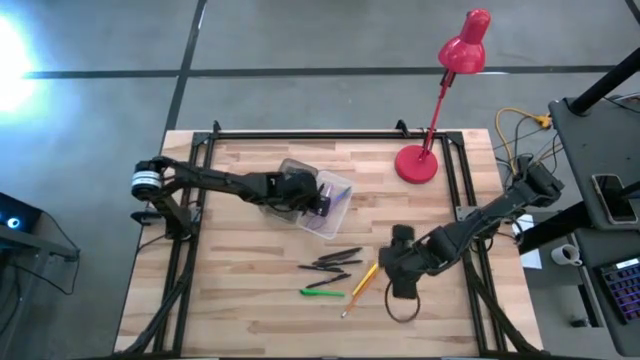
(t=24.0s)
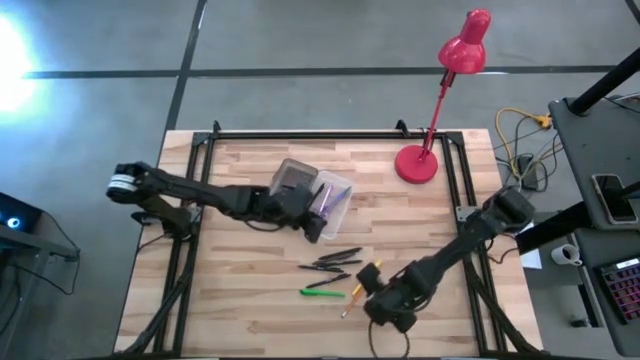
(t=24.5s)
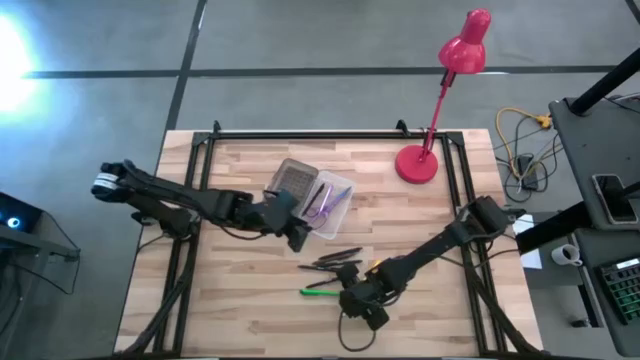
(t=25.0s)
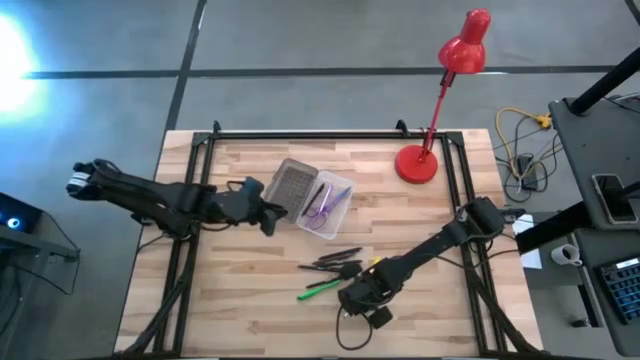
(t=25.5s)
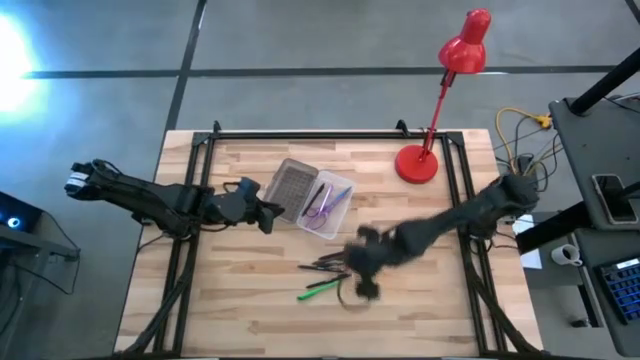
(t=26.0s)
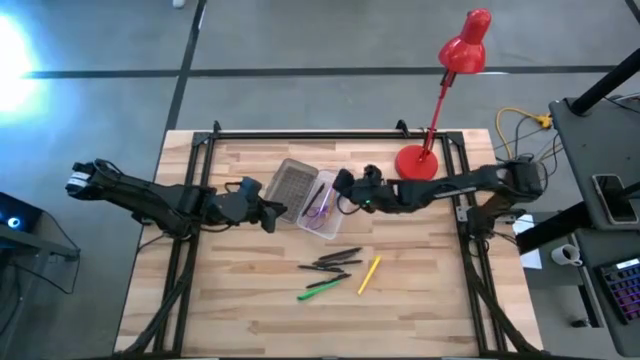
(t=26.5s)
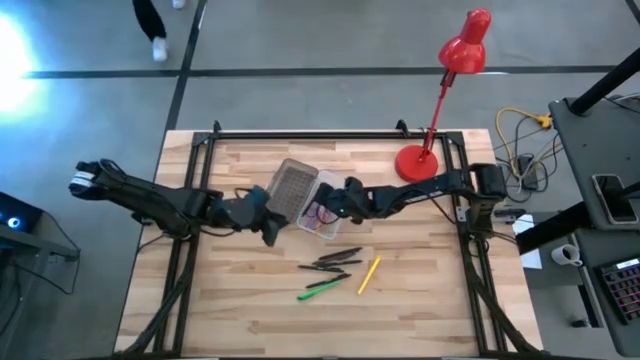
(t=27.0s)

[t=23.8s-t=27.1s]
Task: Pick & place school supplies into a supply box
Put the orange pencil into the supply box

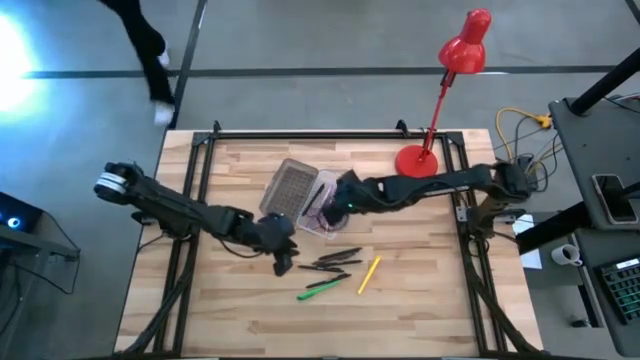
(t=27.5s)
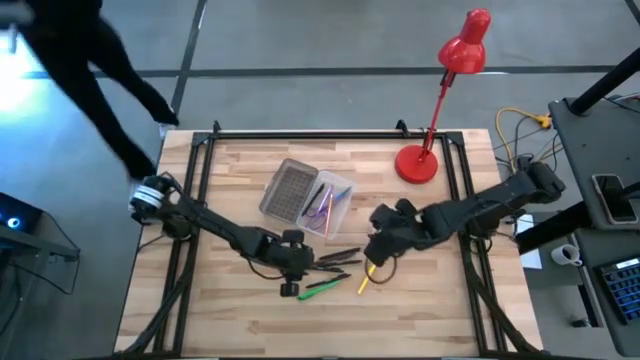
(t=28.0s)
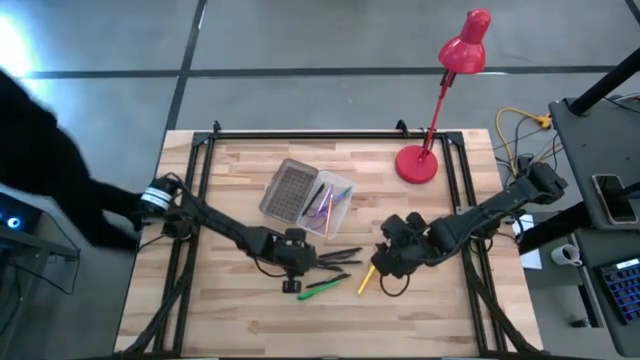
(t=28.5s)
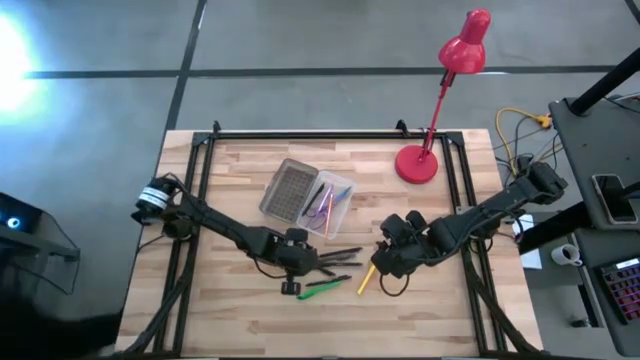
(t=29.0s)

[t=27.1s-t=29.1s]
Put the black pen into the supply box

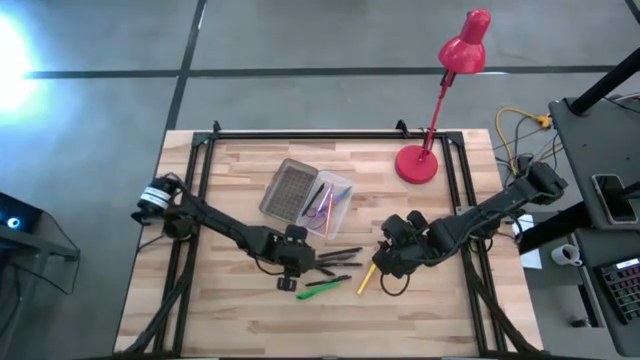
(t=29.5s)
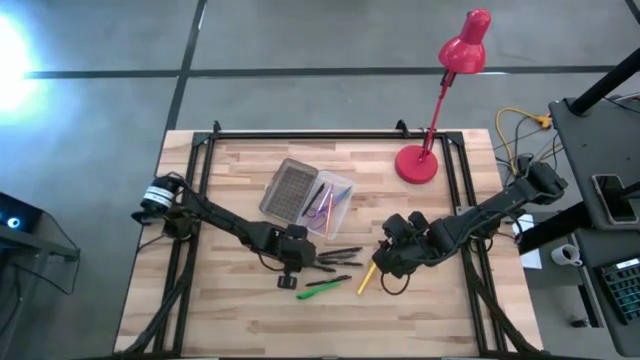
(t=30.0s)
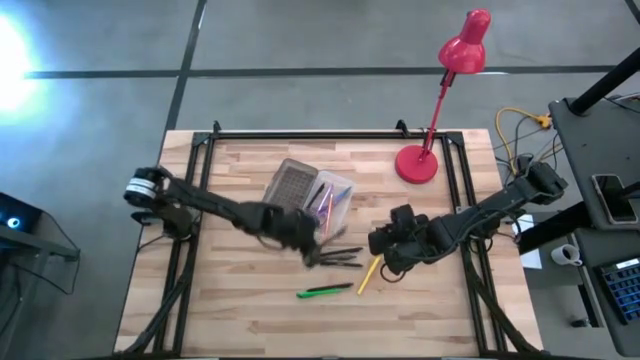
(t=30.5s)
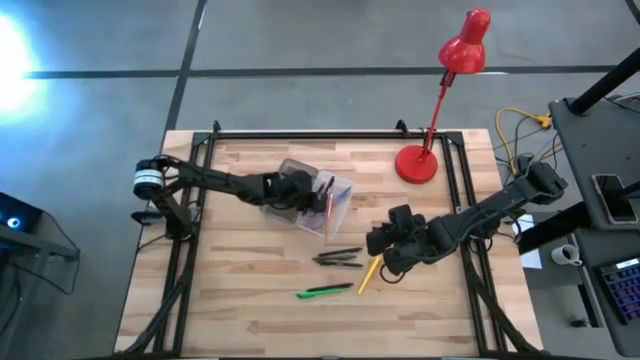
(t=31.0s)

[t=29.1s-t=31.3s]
Put the black pen into the supply box

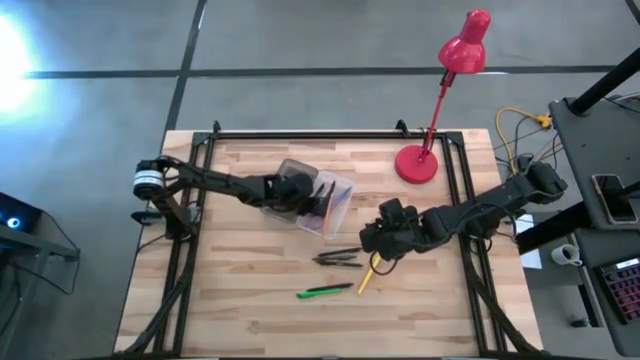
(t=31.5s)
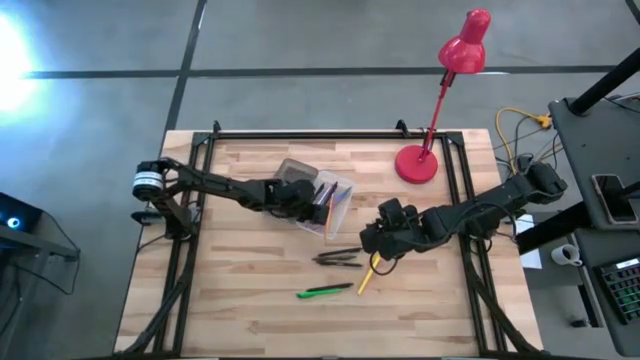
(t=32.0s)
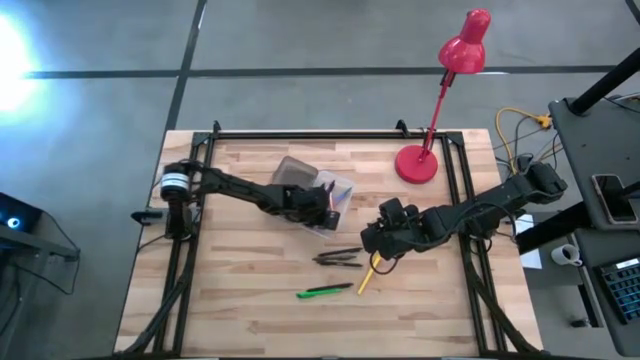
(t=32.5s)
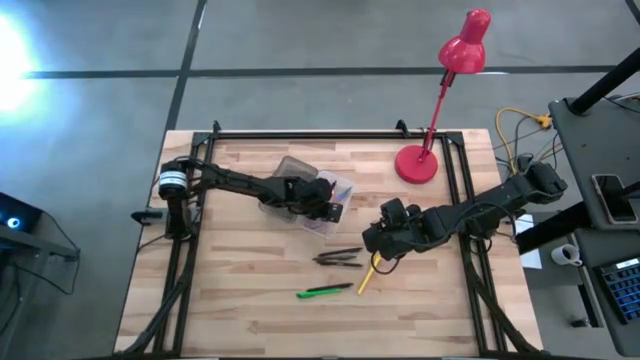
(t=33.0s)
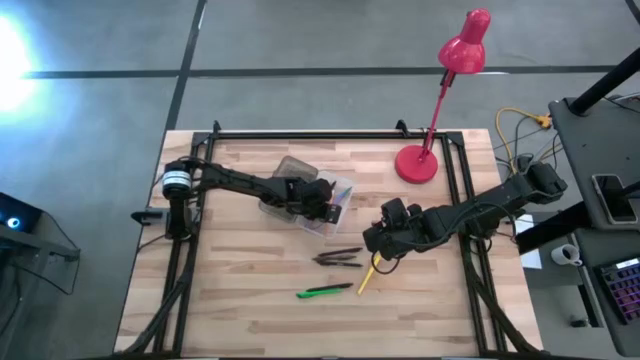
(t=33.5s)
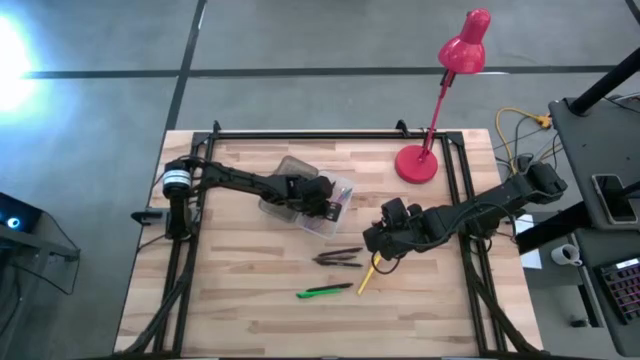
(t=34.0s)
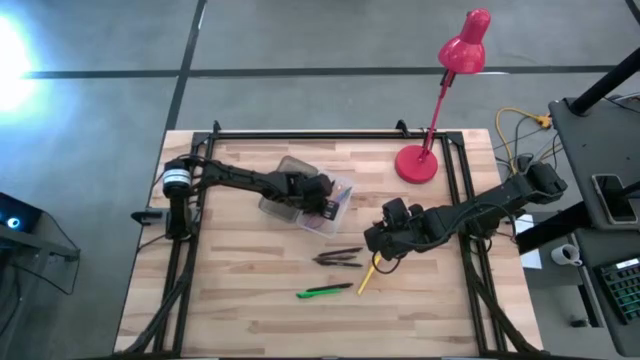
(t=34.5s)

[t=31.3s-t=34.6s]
Adjust the orange pencil

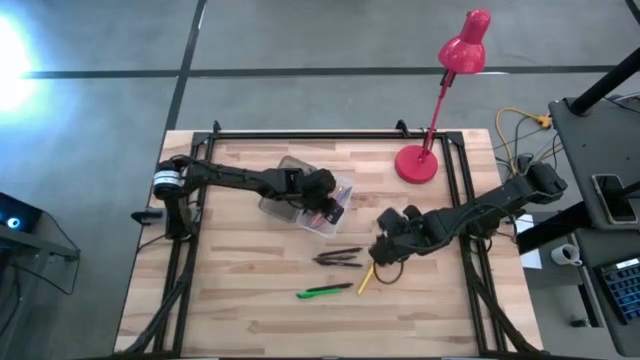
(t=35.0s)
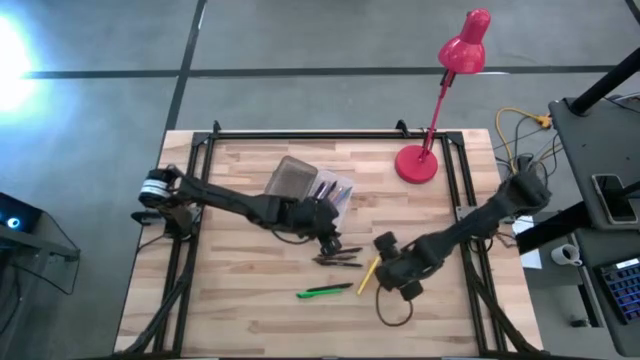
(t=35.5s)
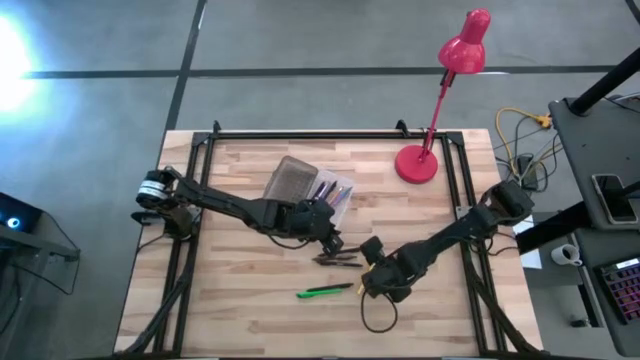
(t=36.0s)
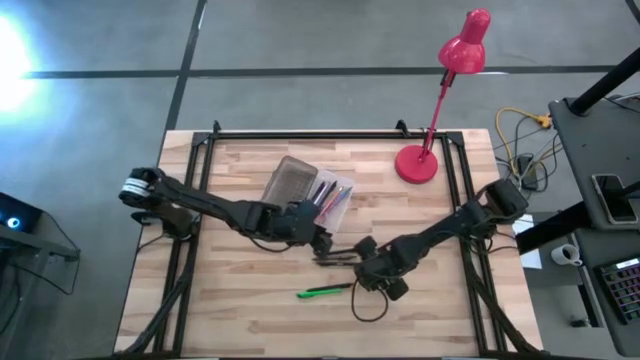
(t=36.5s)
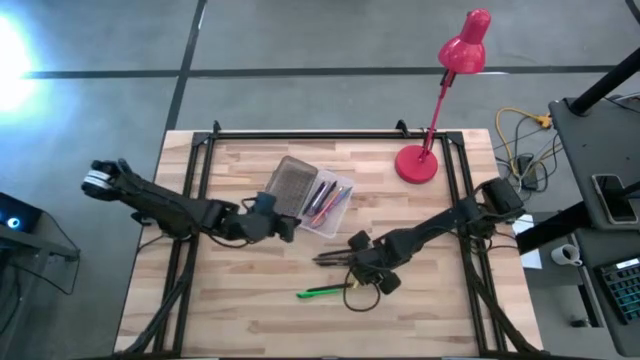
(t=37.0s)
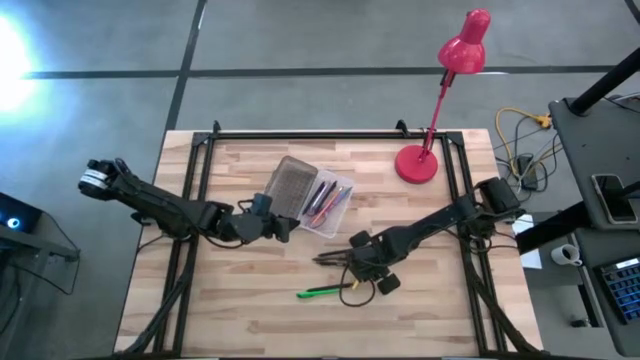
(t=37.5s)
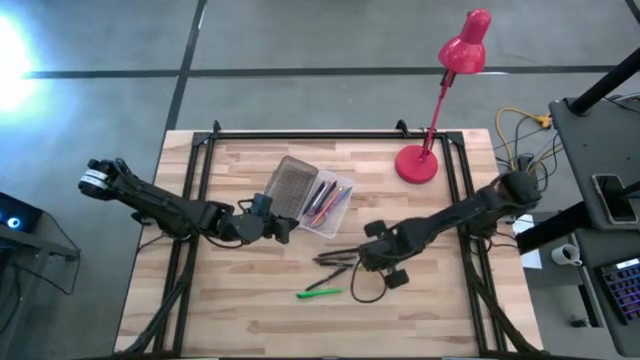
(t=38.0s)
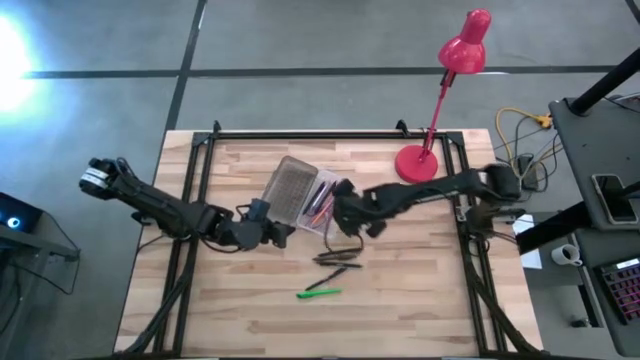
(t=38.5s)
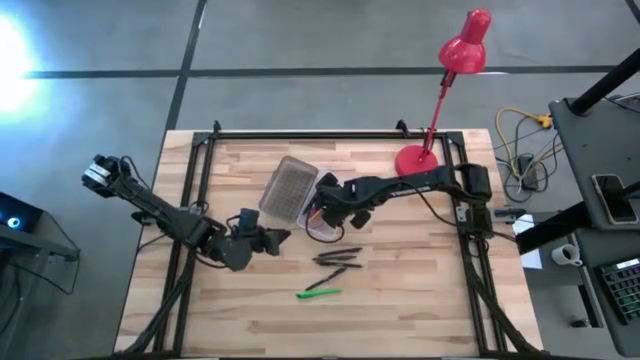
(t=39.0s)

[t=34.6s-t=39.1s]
Put the yellow pen into the supply box

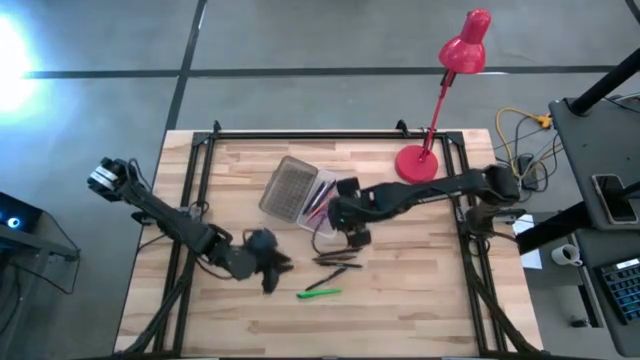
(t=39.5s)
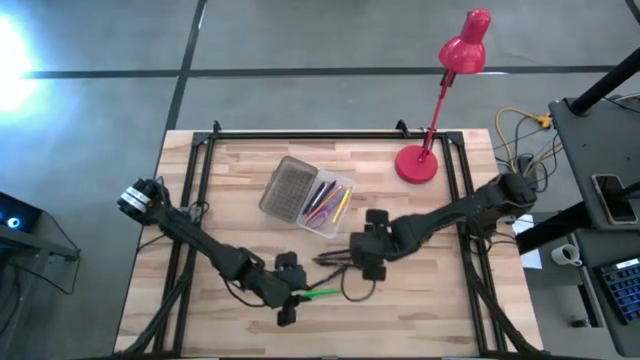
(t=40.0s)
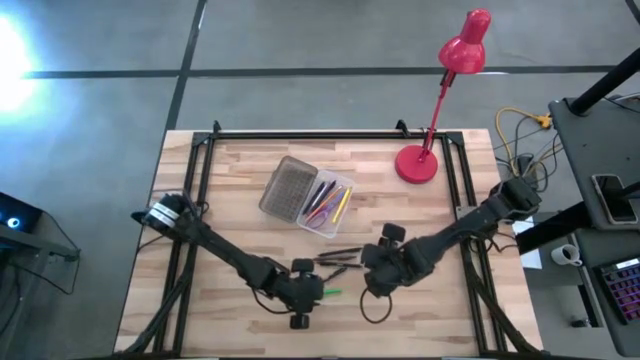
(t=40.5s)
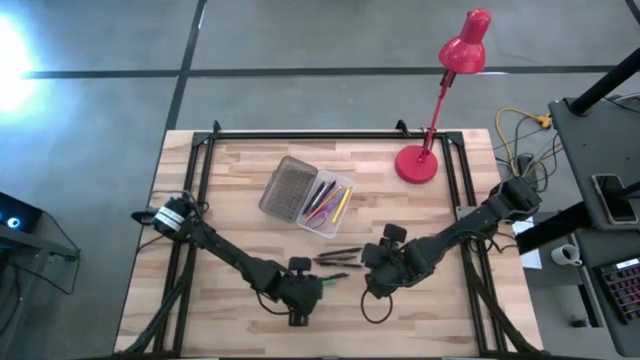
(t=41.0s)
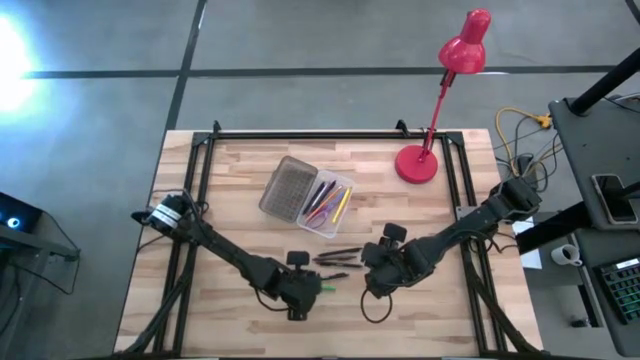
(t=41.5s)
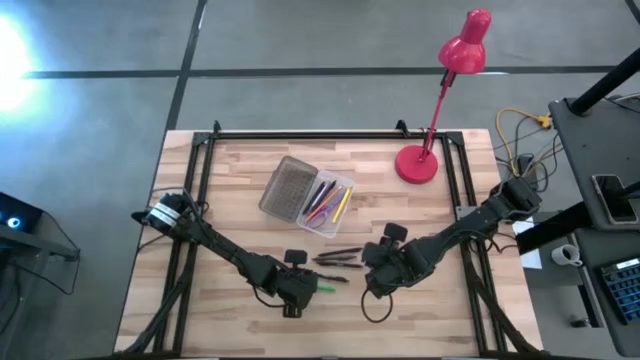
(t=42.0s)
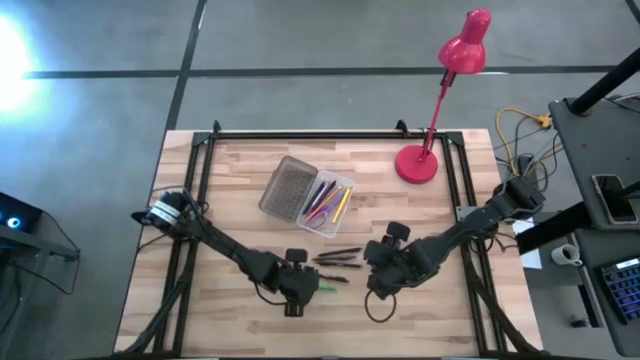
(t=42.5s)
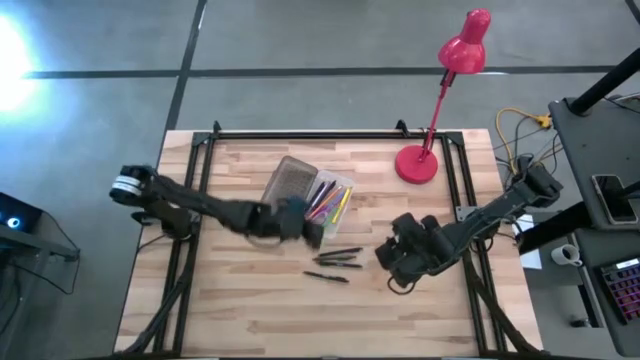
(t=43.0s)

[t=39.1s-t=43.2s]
Put the green pen into the supply box

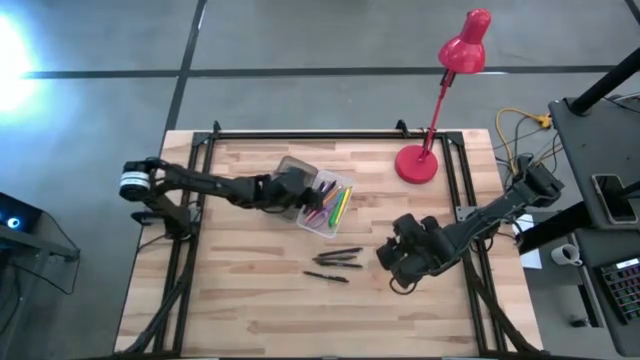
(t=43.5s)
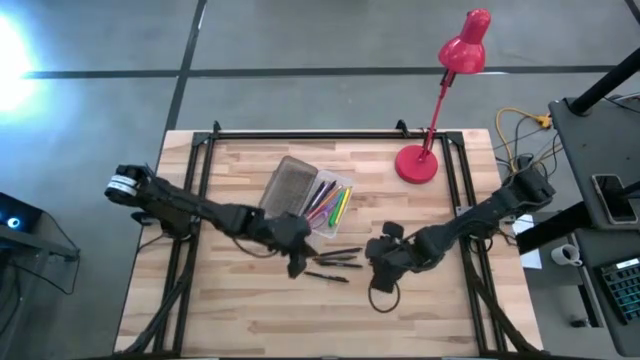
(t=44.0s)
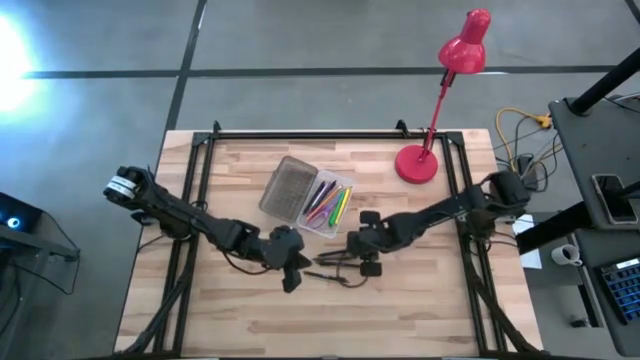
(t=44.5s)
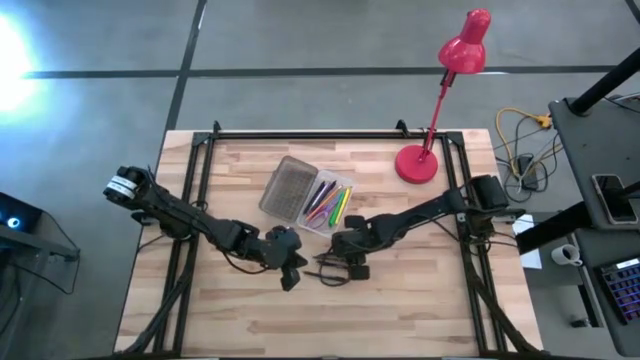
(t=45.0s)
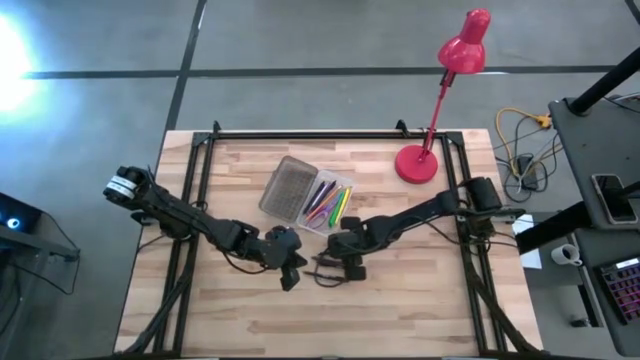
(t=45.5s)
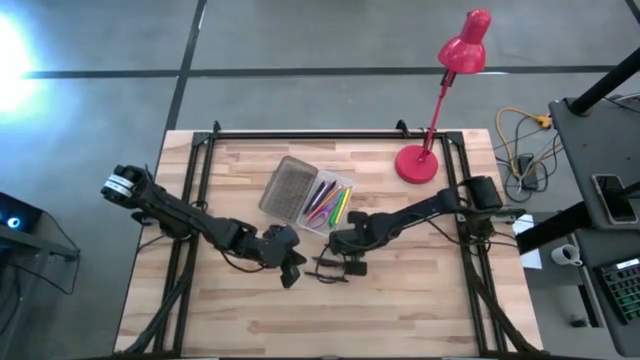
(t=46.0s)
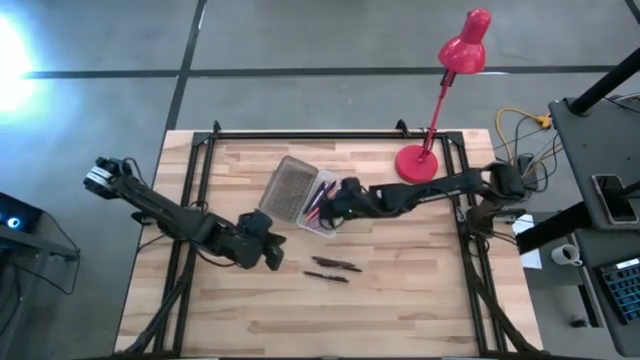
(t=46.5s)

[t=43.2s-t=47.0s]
Put the black pen into the supply box
